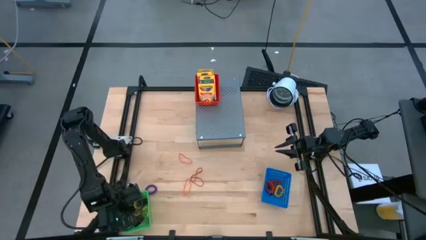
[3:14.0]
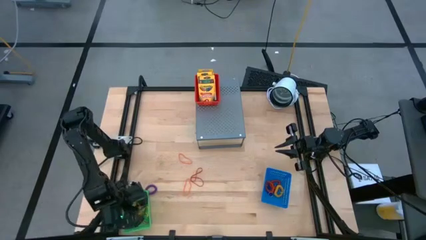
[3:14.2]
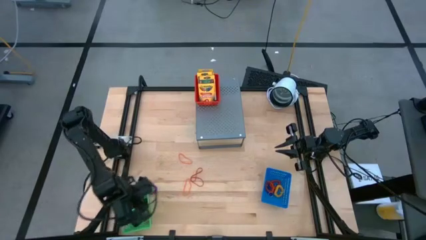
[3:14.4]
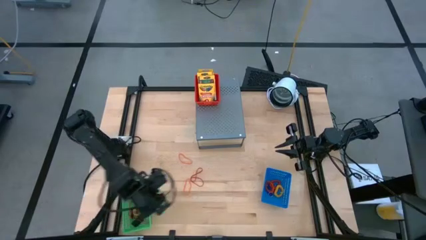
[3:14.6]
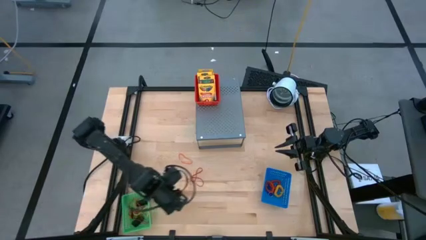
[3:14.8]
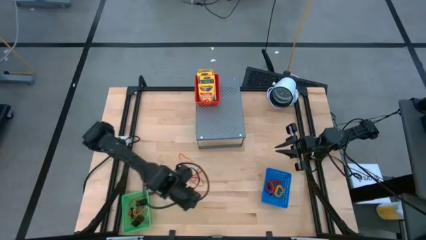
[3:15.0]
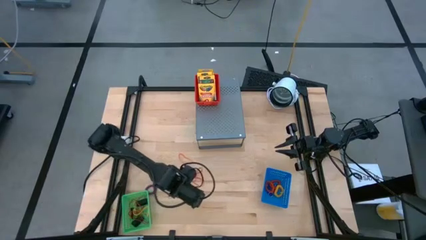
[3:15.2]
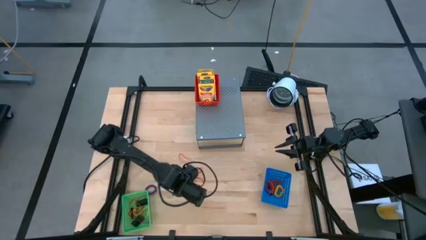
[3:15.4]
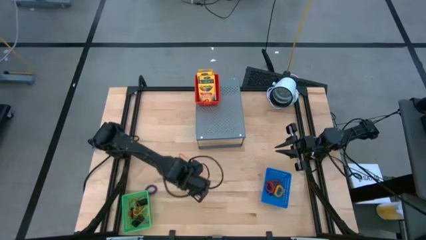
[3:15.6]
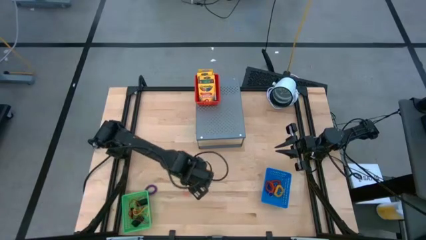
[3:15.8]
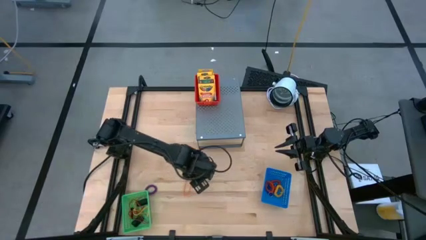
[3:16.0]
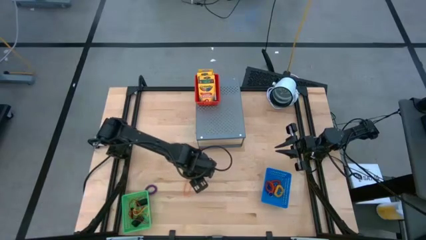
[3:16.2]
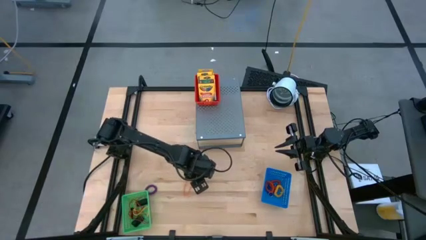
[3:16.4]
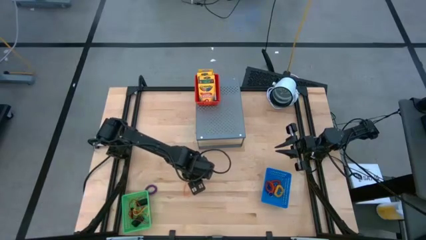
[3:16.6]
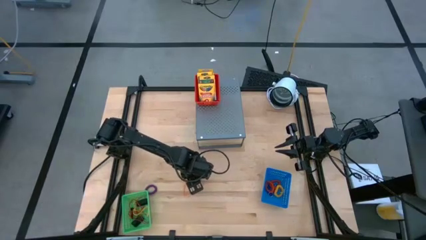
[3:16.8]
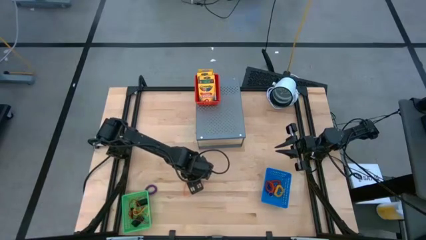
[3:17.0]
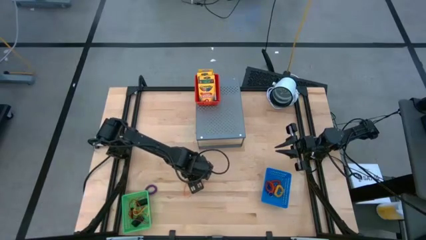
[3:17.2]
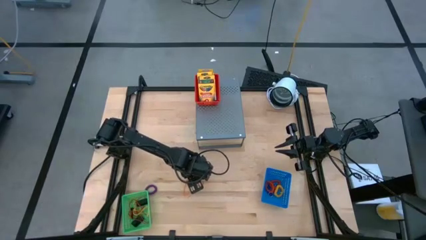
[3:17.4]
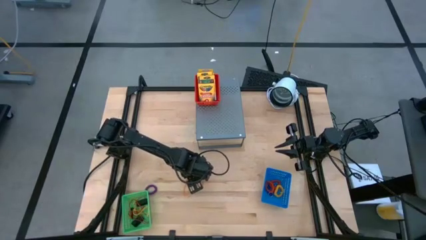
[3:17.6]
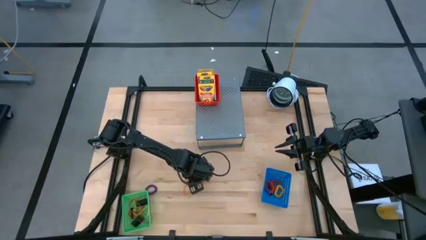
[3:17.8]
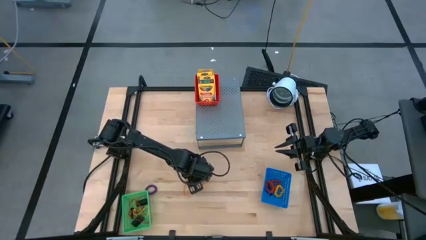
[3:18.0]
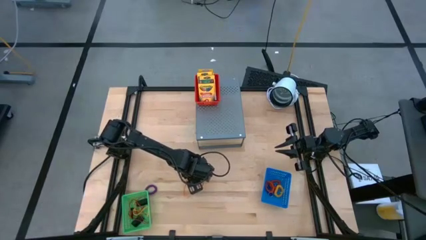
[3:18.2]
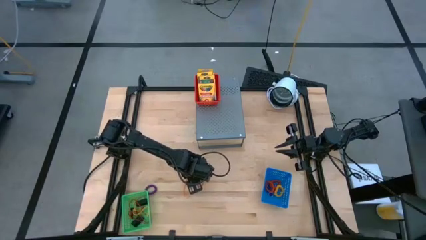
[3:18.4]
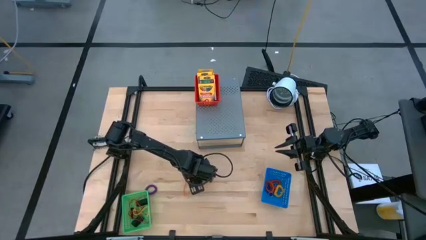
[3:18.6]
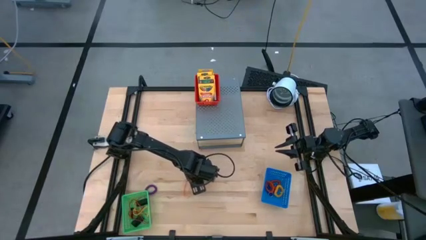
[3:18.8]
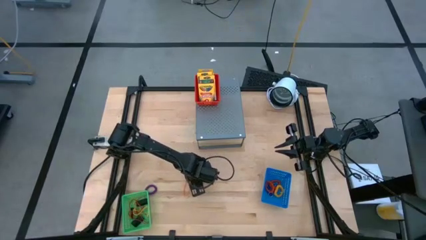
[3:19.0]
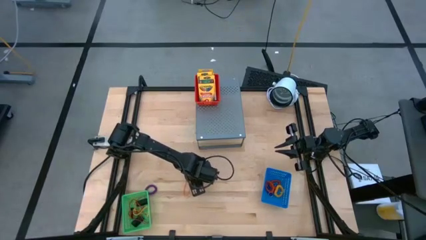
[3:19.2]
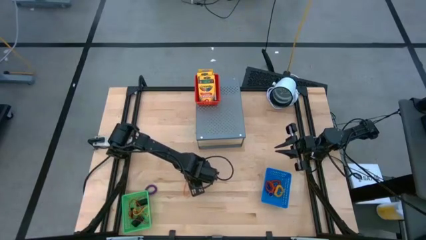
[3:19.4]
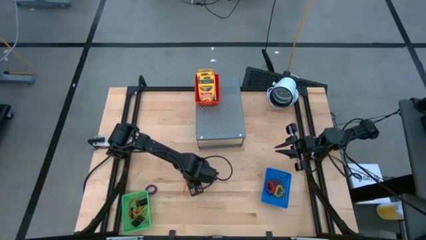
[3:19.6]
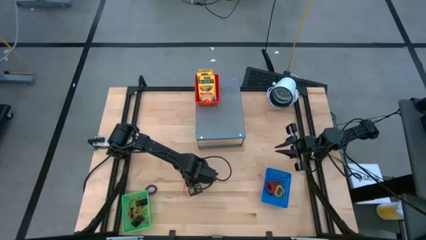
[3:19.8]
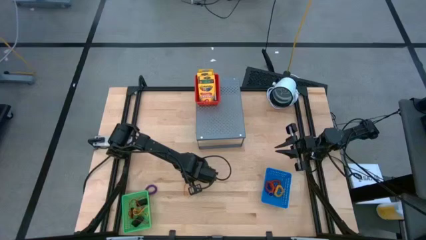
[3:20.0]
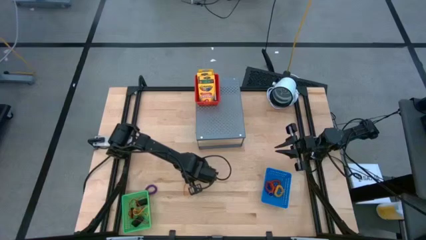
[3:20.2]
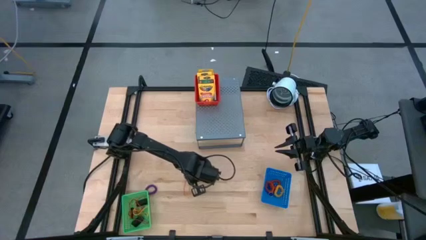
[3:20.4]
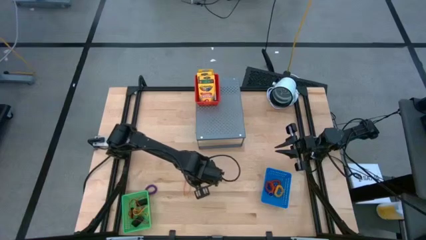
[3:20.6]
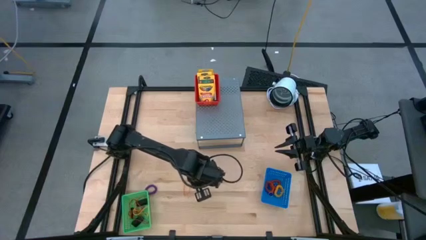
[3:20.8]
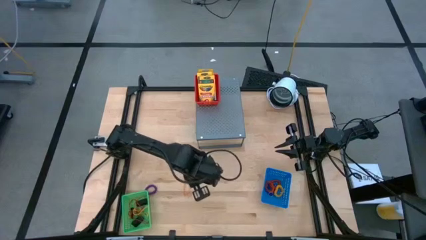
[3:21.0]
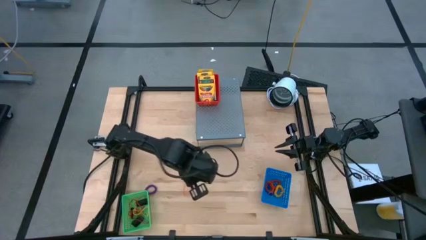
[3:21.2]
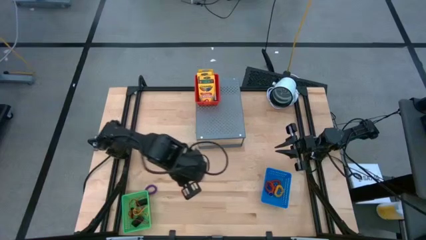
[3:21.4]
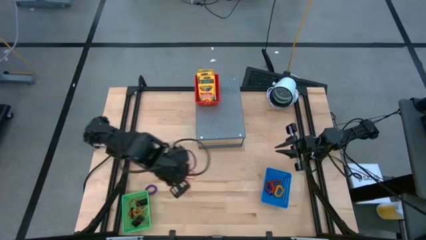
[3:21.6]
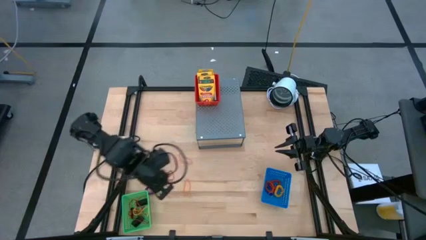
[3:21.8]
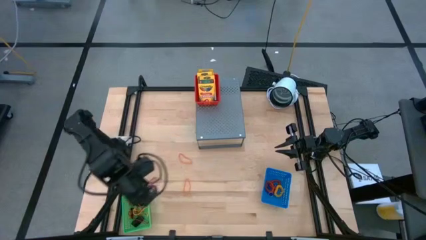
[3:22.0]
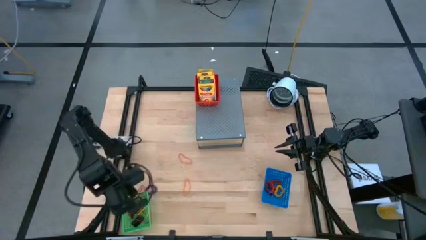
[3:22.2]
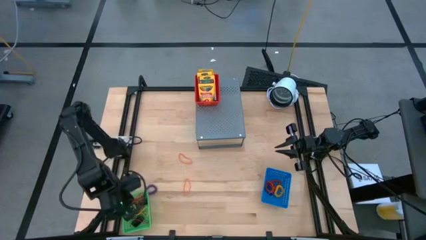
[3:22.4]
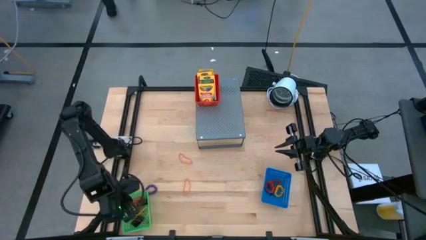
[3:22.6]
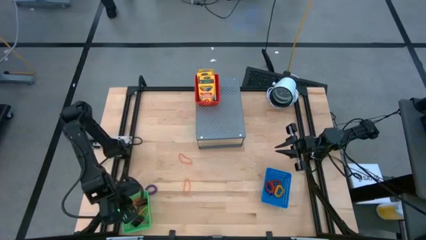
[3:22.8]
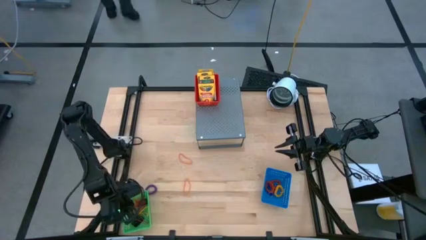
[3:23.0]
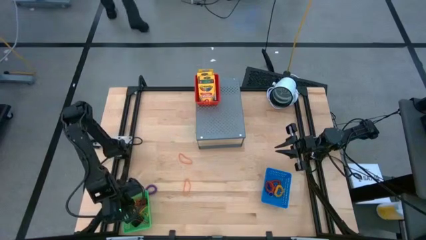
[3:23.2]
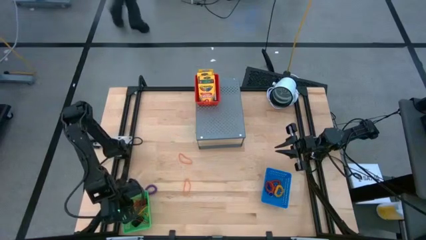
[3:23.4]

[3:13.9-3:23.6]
Task: Pick & Place Office Desk Supplies
Put the red rubber band into the green bin

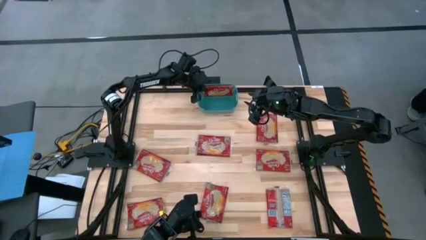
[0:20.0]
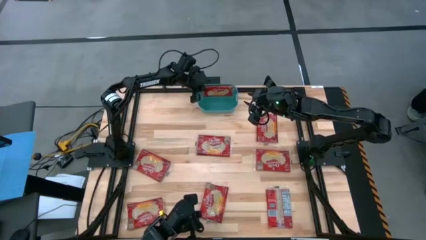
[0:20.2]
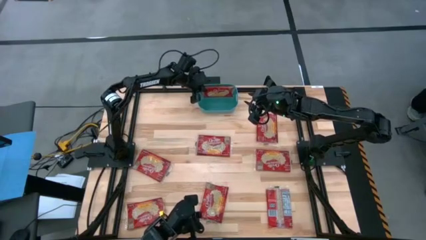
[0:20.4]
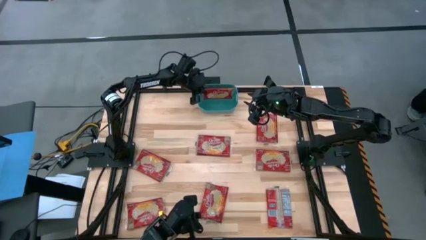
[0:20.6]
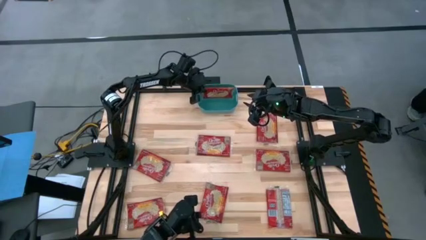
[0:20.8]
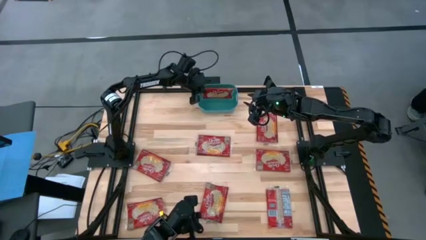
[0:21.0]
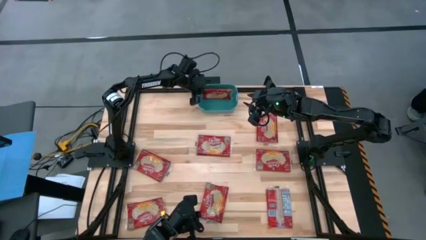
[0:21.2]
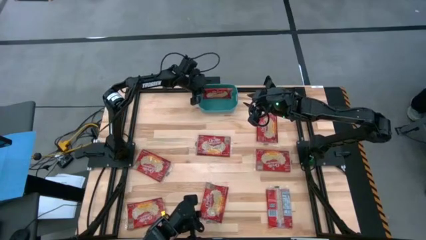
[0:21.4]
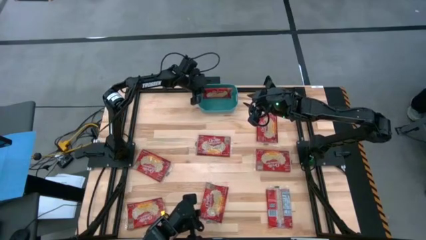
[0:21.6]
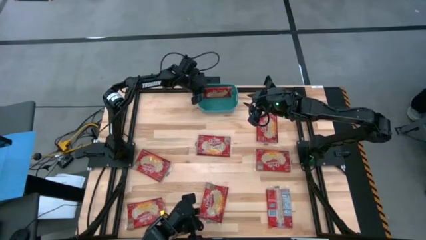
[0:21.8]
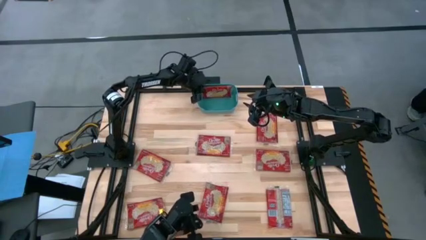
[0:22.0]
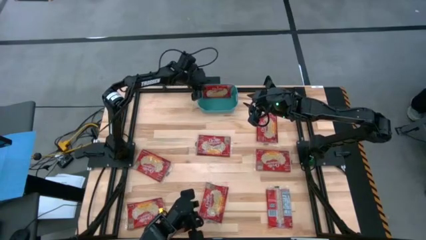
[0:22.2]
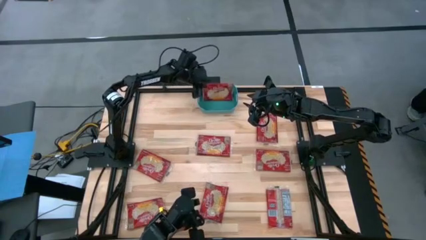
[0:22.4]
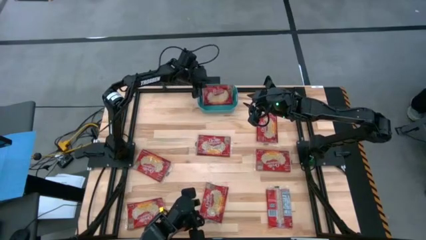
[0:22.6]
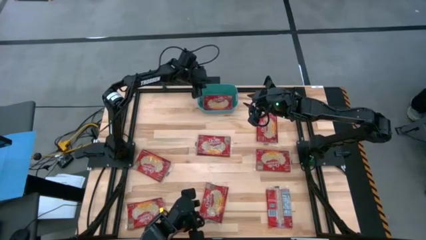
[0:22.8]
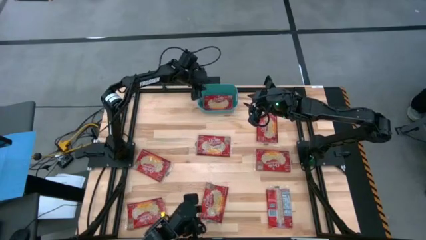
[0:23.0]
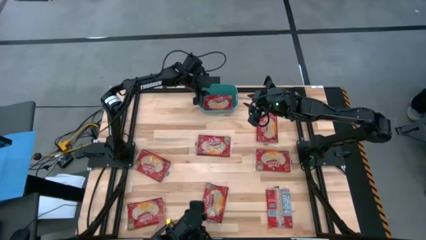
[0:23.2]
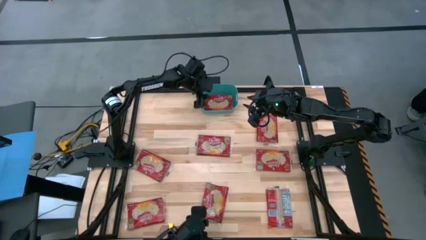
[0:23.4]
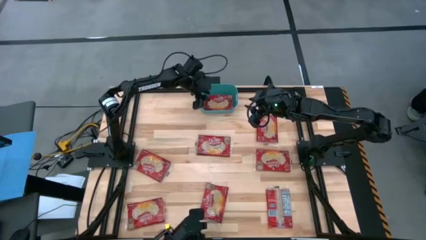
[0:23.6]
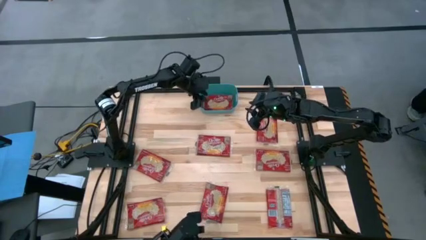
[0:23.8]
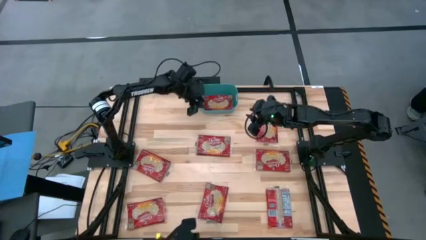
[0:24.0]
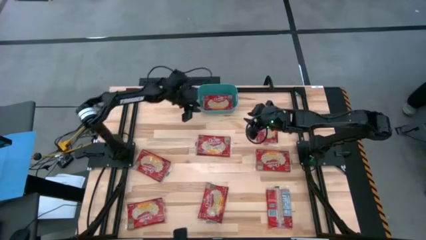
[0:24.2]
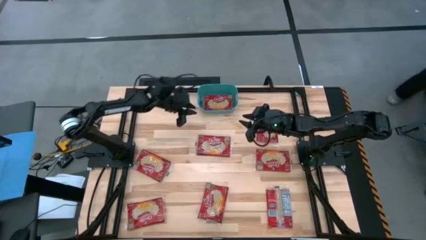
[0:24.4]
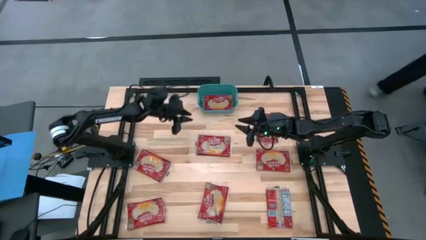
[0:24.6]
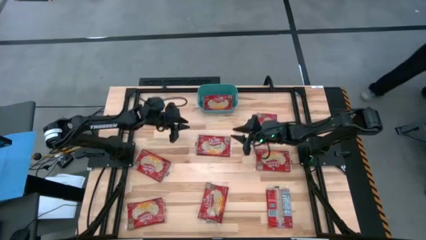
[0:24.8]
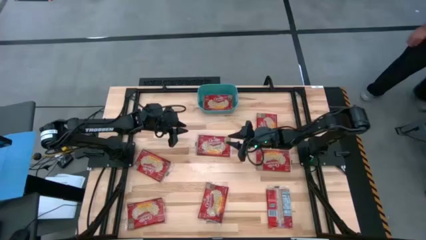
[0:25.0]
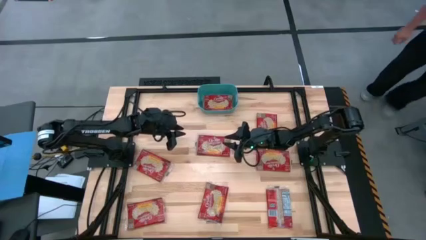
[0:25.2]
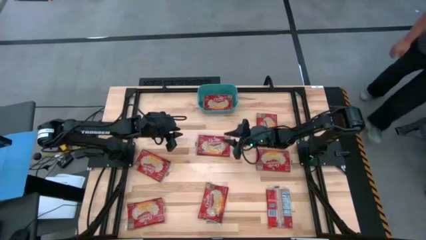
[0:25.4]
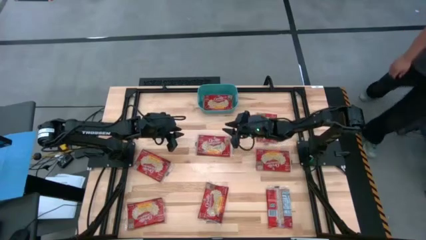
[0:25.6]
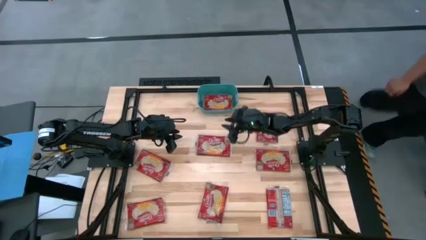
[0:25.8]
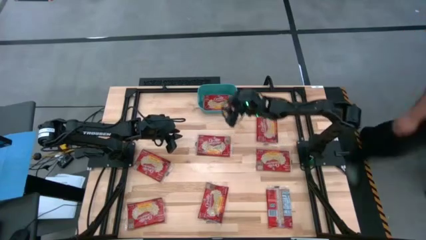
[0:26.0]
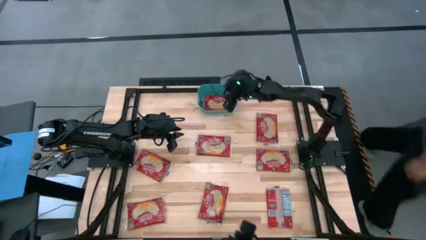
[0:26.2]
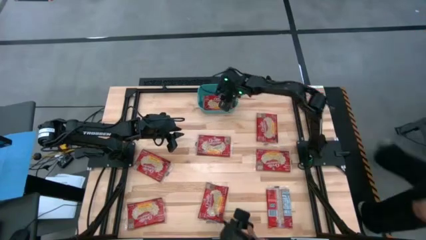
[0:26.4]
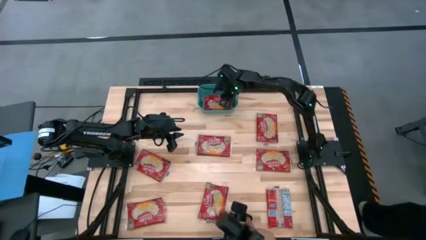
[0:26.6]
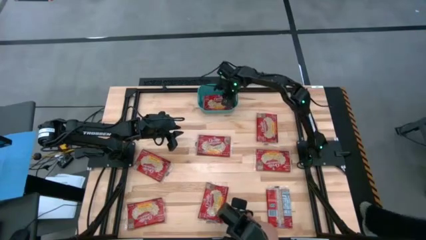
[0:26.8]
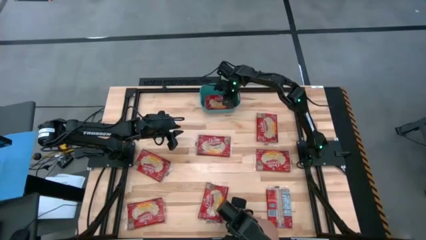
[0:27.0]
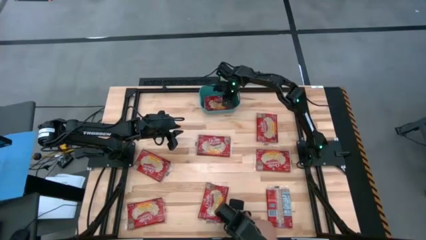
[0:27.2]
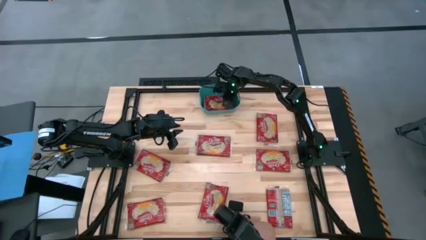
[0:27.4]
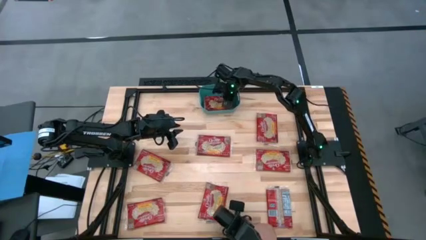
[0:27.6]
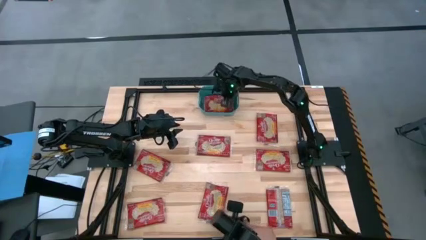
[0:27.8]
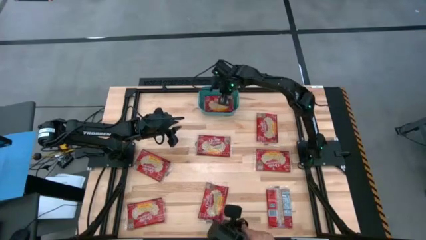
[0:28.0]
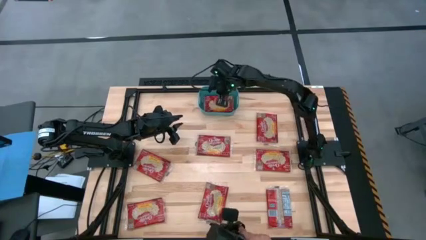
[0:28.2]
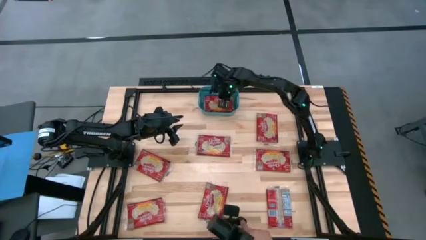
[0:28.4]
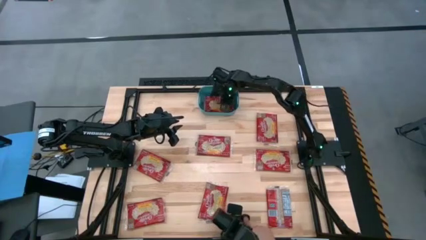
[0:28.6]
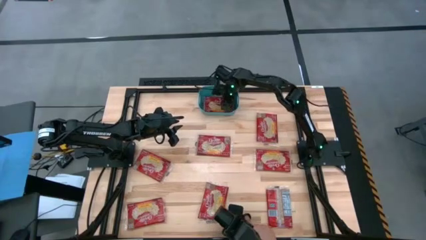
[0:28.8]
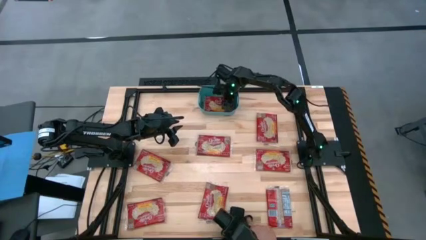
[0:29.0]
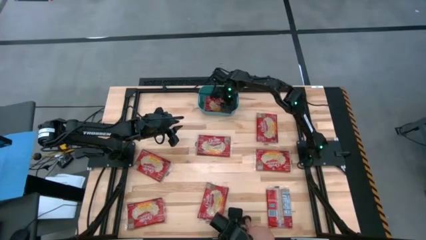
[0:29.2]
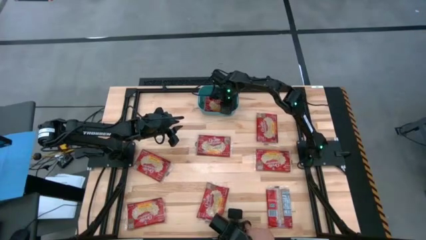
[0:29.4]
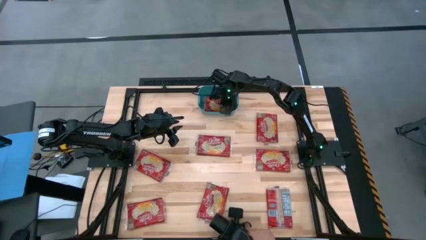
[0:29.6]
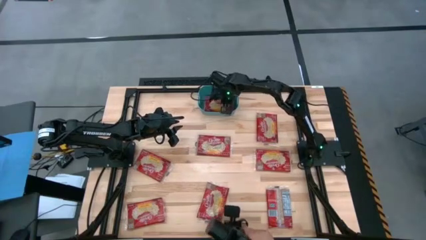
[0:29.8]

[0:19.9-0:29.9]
Task: Sort popcorn bags into baskets
Put the red popcorn bag into the blue bin
